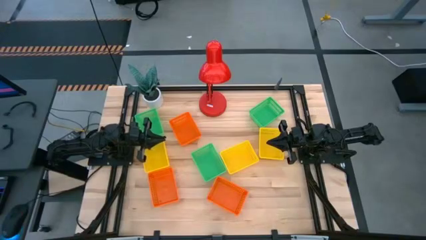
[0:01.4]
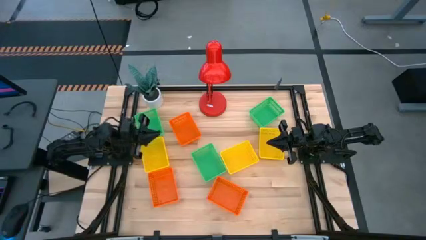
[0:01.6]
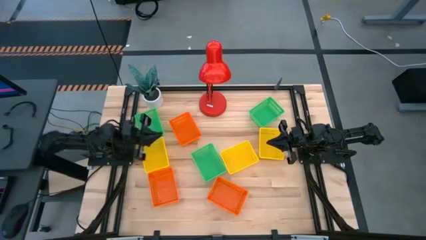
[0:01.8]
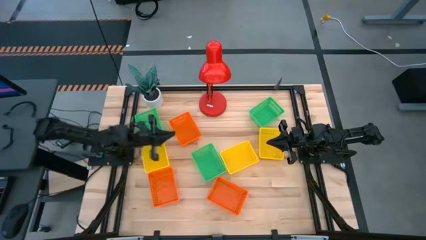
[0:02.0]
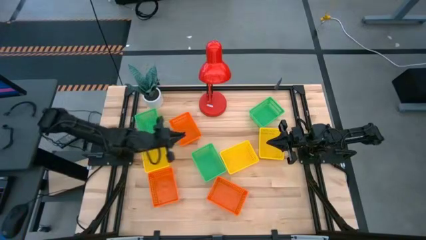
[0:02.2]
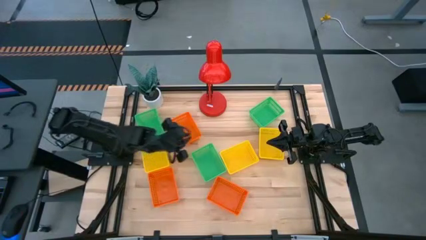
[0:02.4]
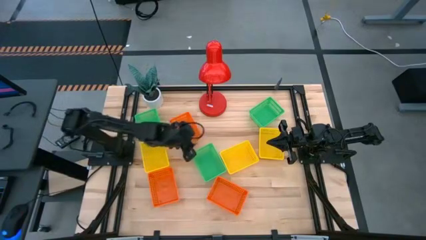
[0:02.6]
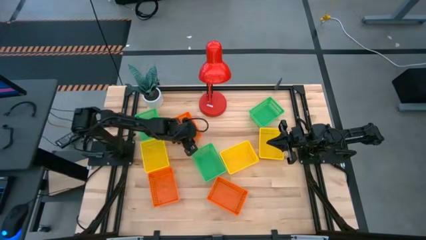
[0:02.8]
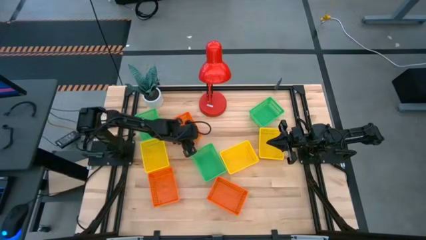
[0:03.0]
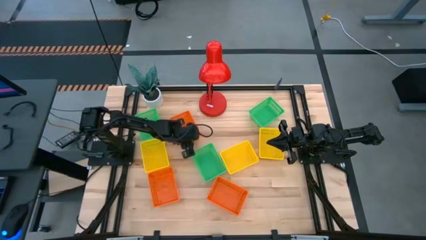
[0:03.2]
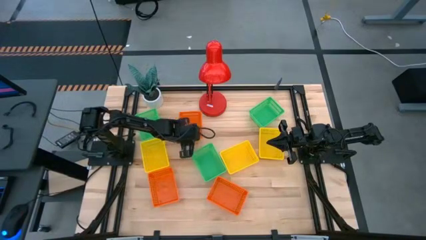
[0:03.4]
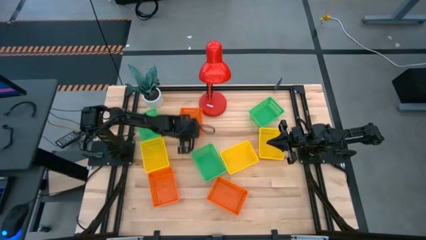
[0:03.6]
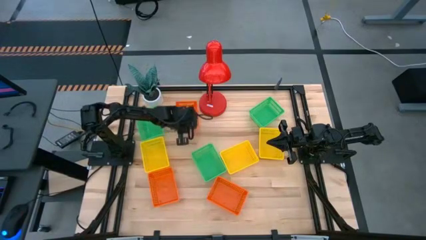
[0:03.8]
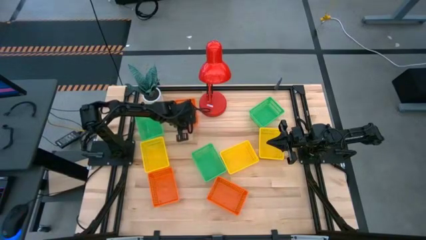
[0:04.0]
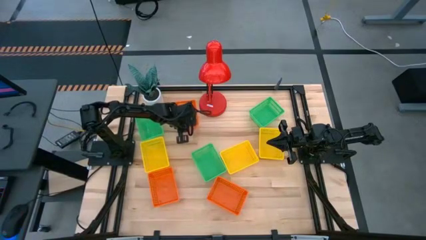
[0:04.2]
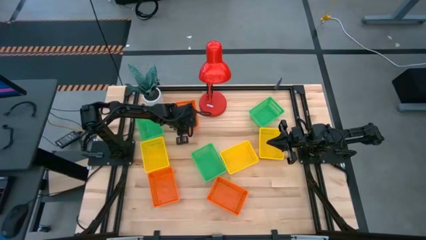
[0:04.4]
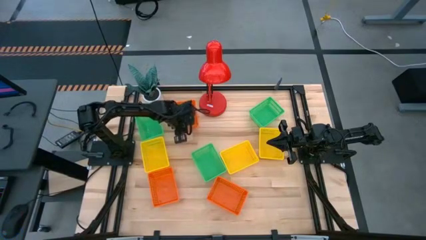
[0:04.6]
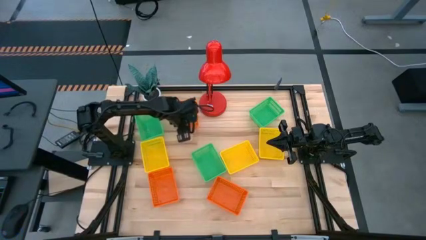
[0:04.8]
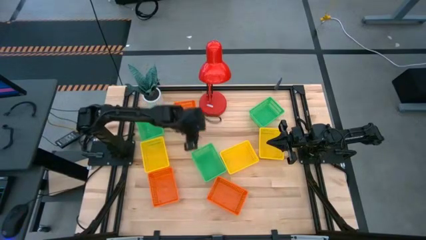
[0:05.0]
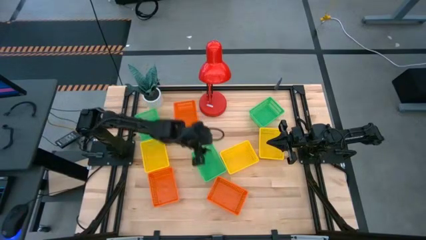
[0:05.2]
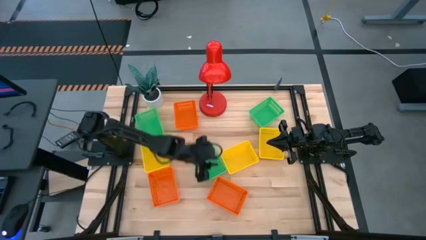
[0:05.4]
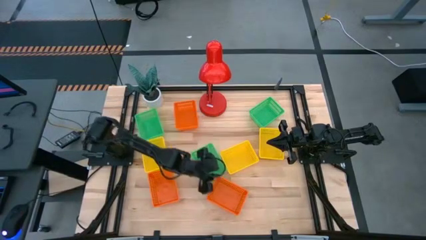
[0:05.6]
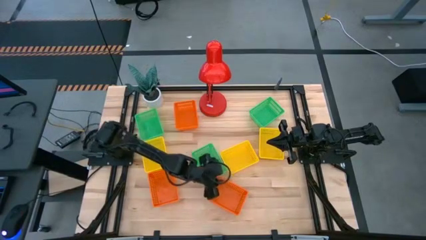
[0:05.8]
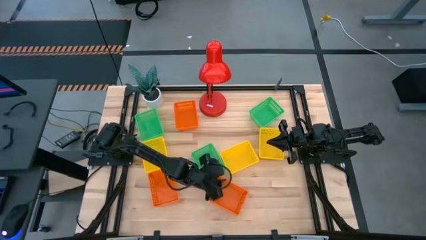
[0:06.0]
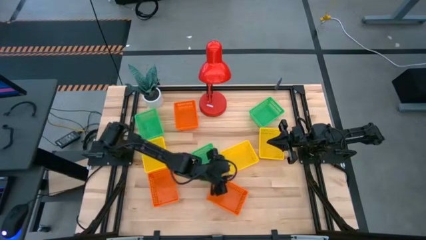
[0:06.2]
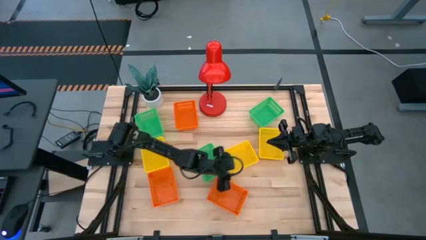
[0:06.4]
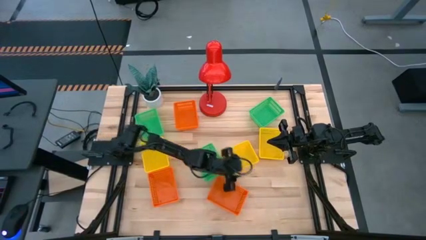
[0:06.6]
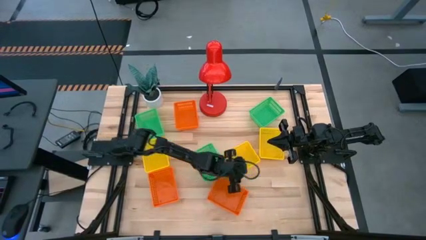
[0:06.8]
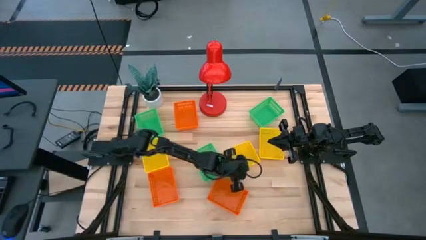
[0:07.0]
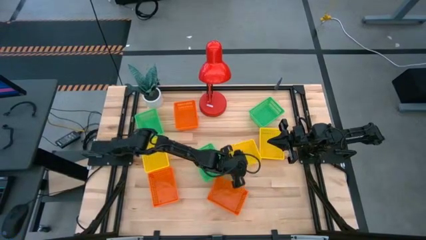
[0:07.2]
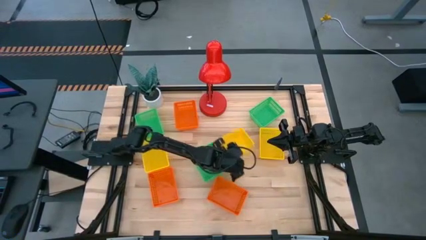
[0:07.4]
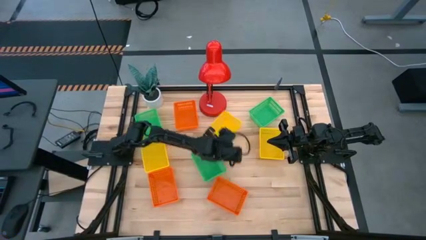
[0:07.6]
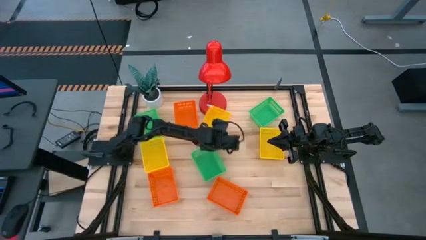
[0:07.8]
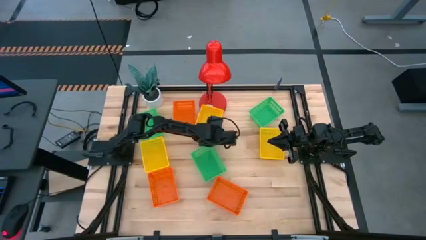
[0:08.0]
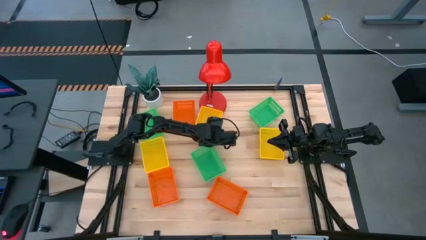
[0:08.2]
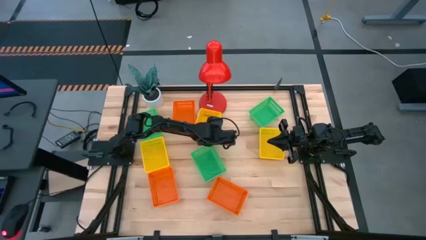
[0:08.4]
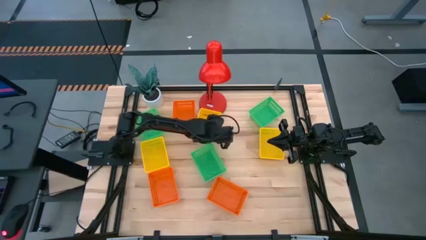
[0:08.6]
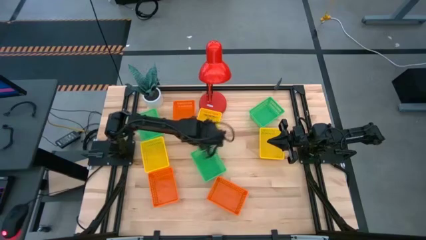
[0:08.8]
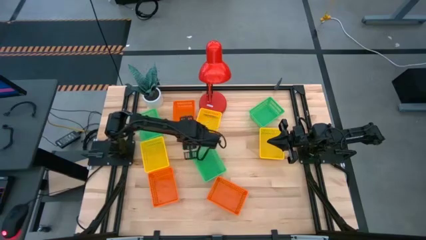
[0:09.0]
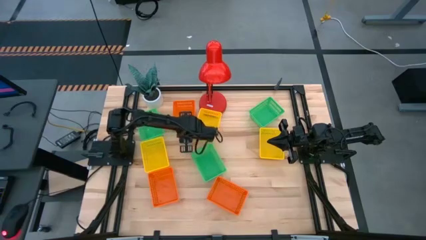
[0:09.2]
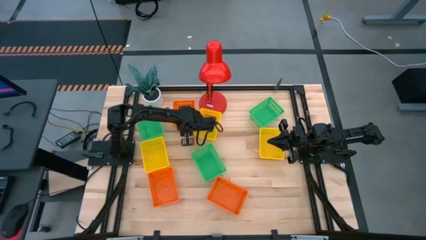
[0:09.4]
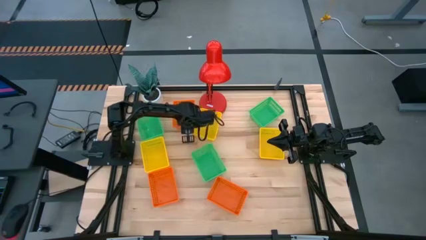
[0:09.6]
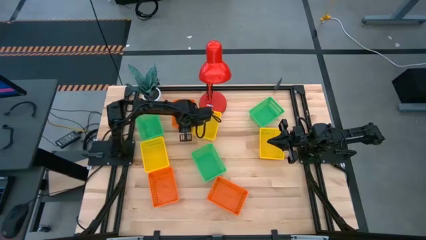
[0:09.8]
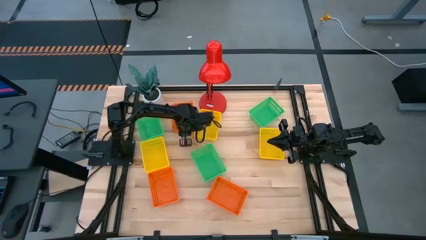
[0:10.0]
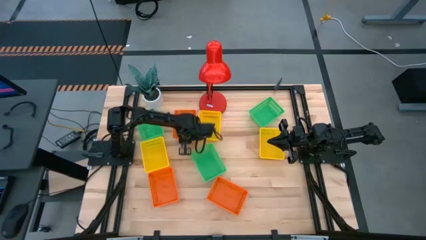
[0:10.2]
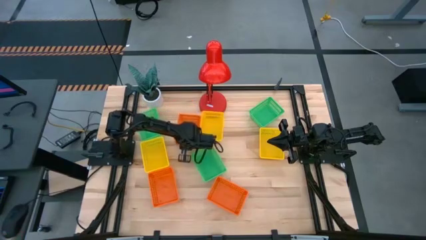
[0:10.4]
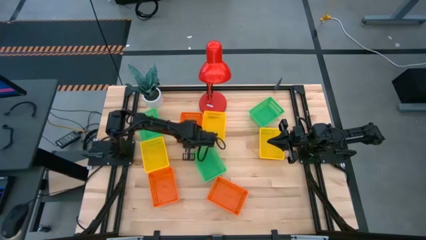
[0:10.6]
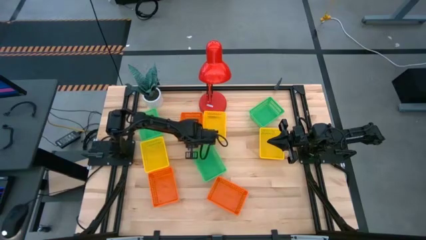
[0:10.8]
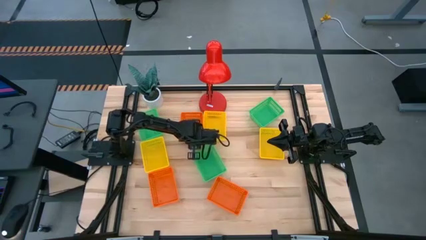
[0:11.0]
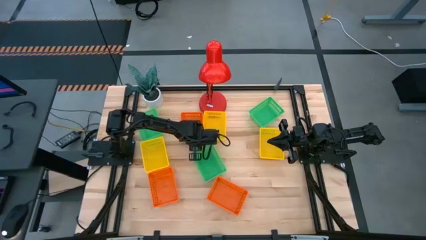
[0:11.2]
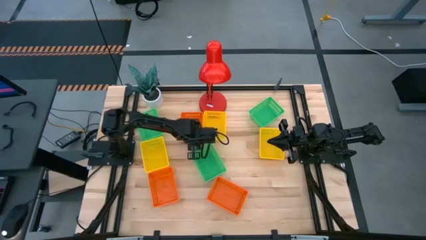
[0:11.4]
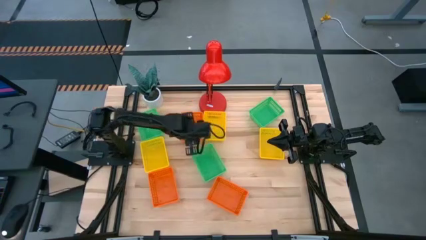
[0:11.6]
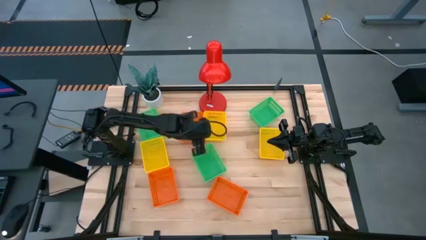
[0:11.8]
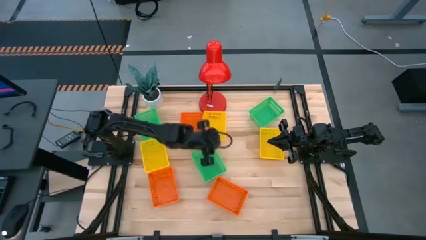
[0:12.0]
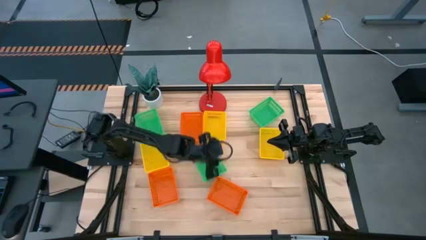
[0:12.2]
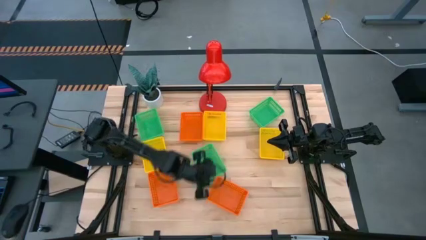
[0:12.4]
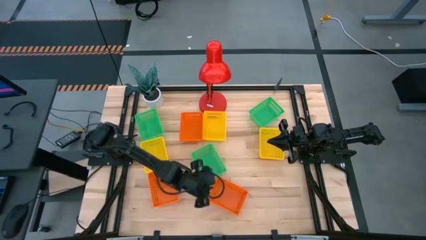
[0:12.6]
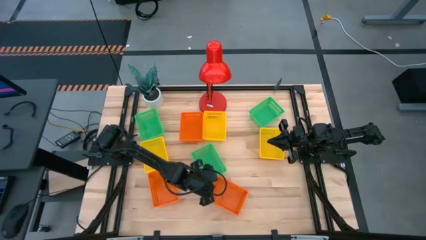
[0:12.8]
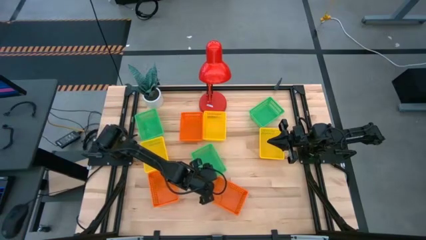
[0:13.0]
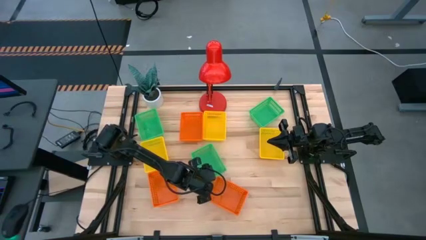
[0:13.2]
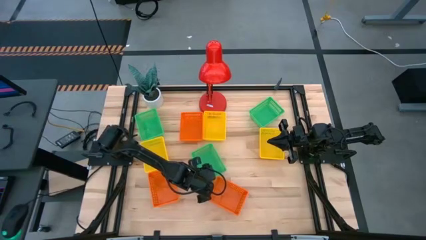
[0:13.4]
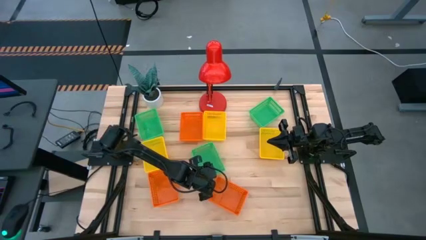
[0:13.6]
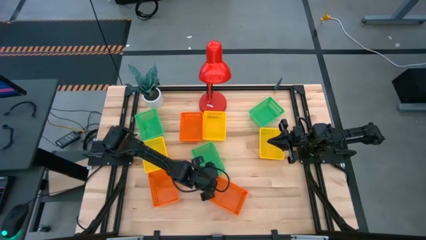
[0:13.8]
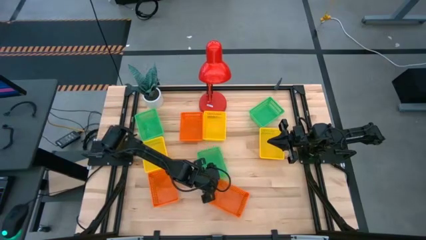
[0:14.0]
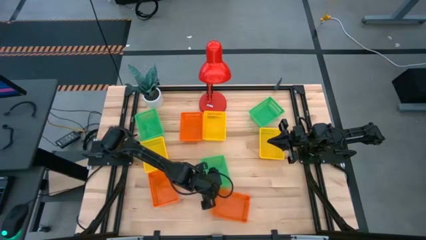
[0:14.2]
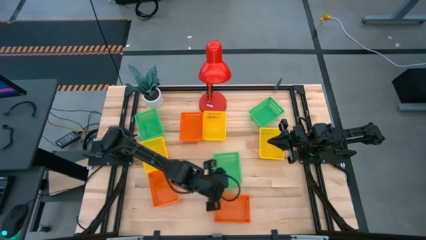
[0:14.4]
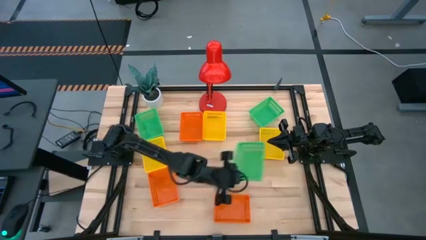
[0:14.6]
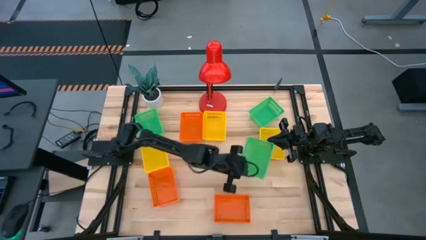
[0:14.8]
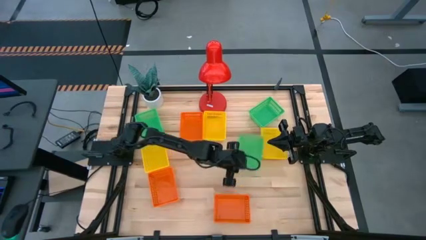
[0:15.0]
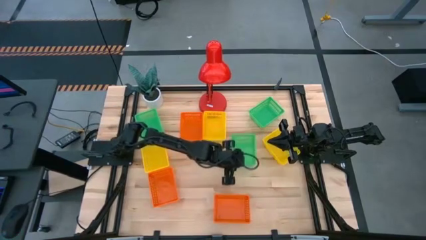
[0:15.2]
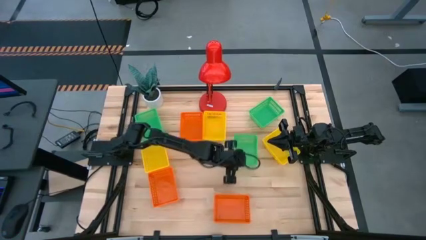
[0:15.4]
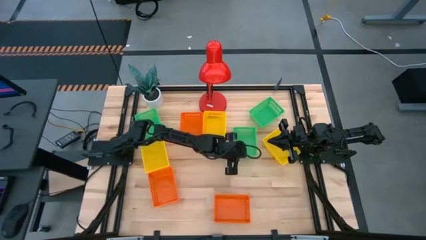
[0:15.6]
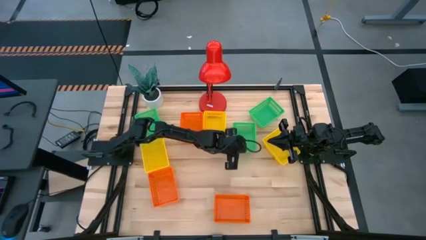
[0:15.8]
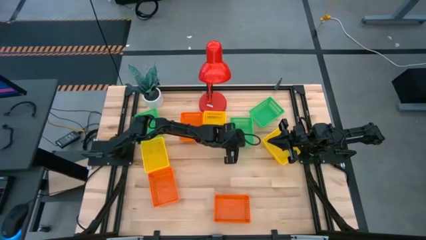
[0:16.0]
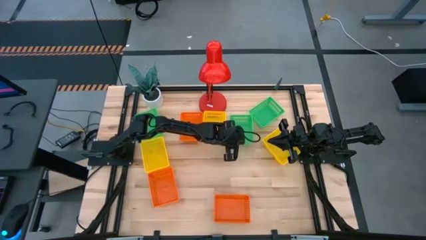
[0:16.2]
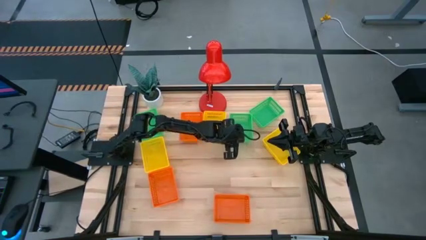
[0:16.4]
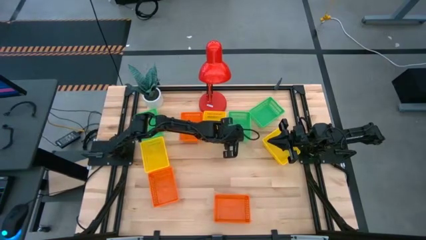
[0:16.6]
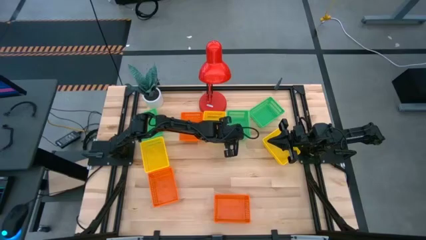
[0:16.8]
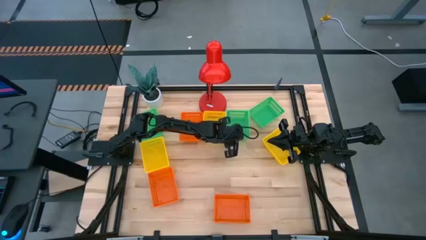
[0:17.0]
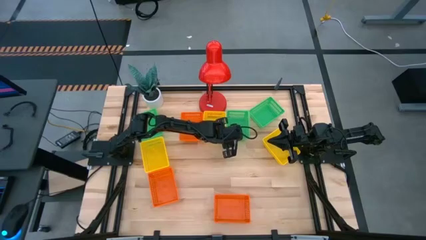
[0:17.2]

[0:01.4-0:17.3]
Prepare the orange, yellow, and green bins
